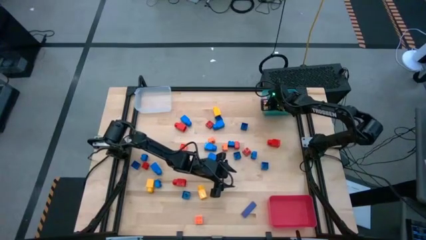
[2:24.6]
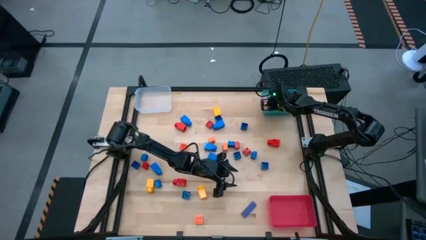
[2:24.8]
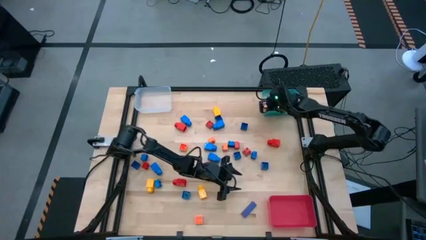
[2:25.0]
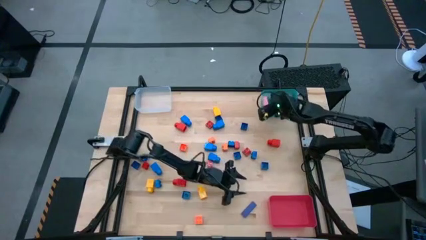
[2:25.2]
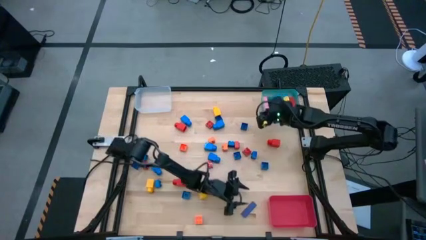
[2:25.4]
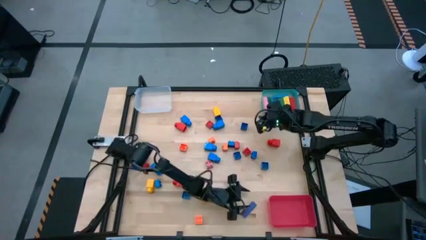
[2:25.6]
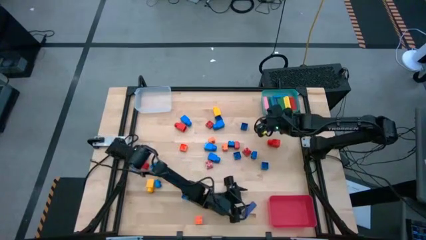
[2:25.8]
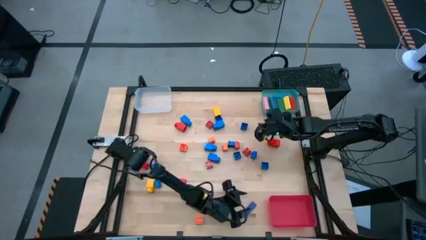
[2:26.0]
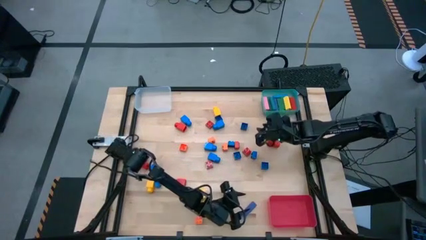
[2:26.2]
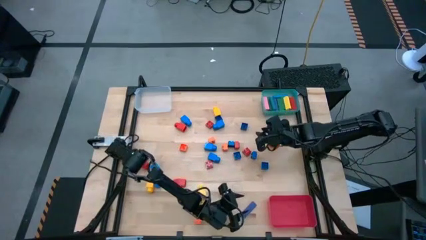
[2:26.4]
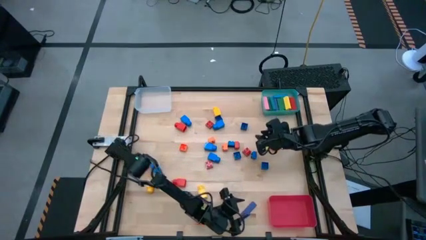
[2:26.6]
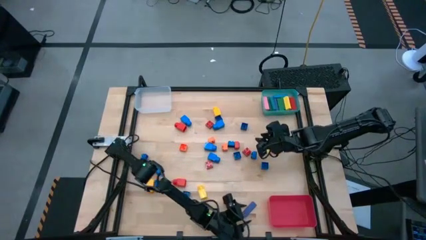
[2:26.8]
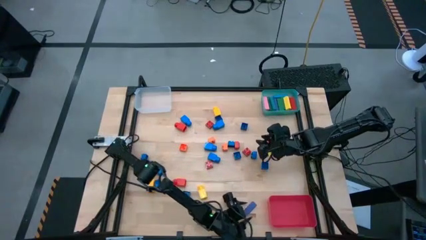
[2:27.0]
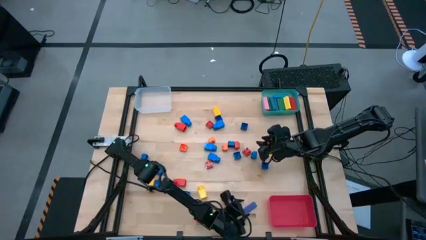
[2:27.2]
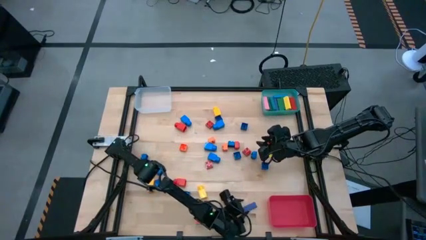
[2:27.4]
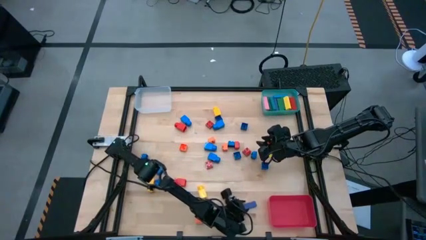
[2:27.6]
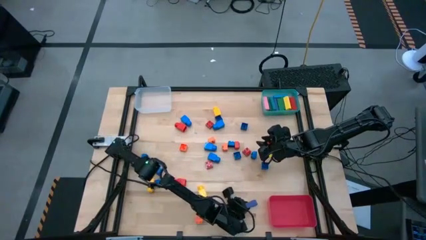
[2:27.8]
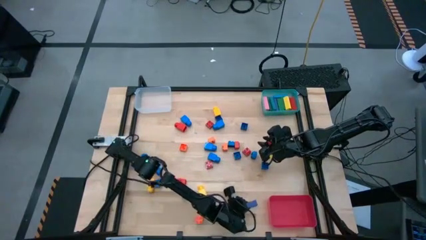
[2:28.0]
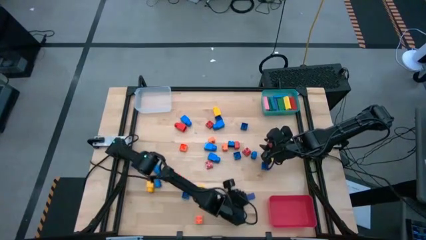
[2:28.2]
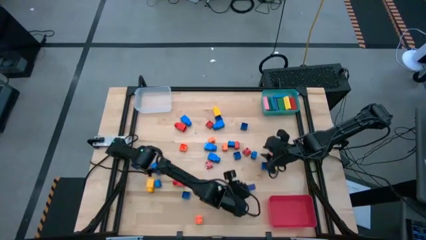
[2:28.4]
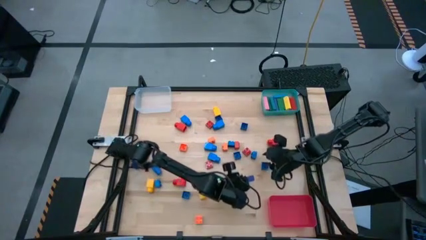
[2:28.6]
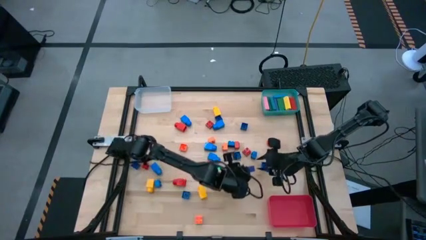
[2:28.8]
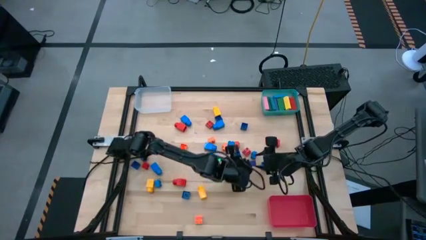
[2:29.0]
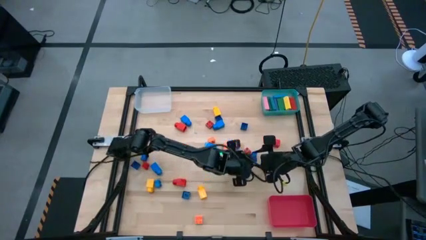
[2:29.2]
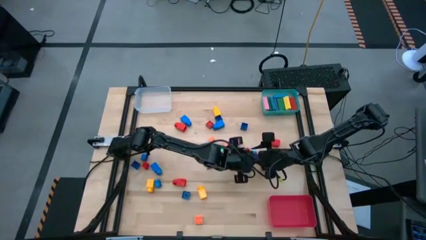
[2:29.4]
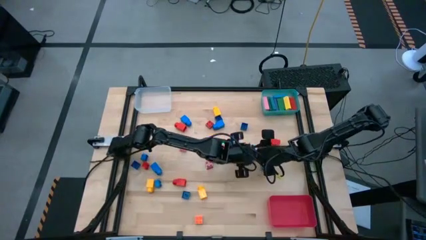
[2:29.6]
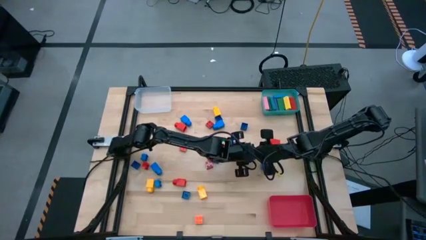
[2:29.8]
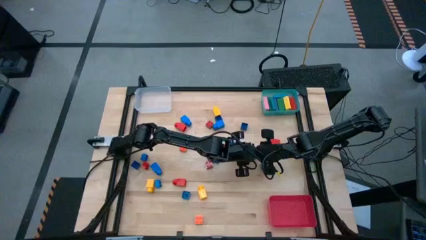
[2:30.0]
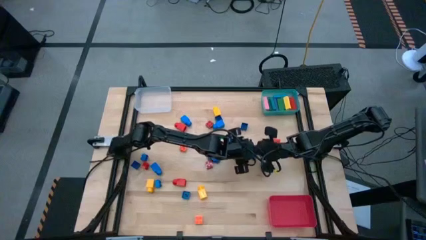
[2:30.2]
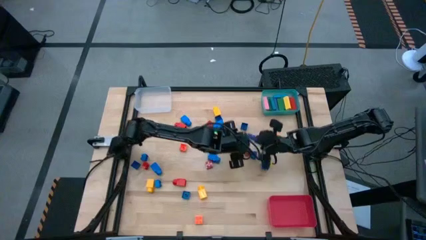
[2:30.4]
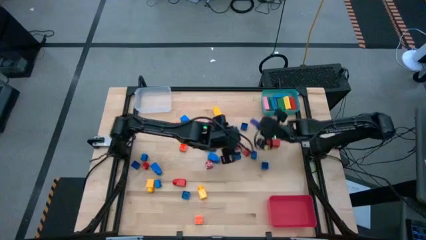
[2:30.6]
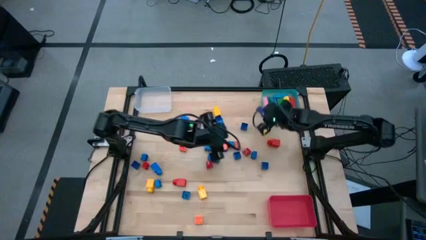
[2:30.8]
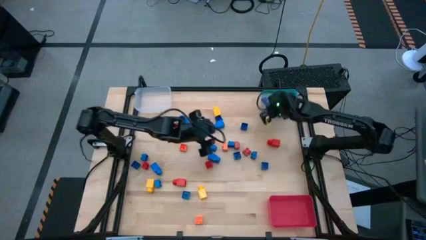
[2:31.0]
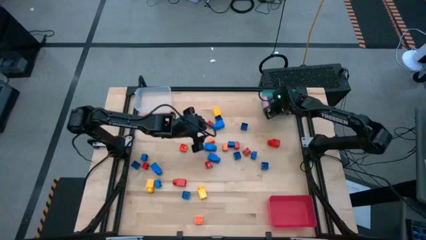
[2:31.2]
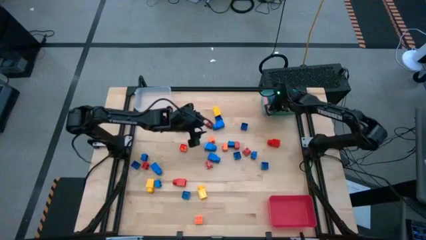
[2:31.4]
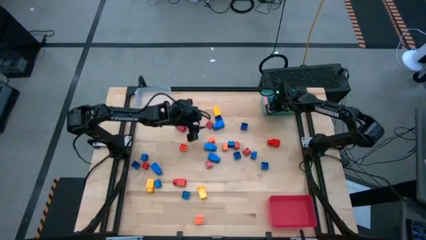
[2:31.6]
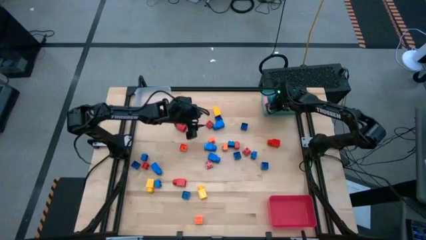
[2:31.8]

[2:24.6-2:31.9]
Task: Sort blocks by size
Put the blue block into the blue bin

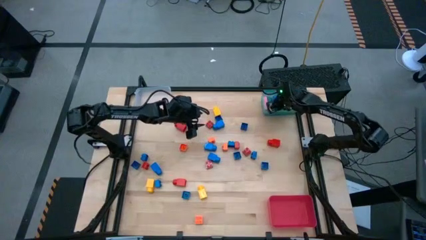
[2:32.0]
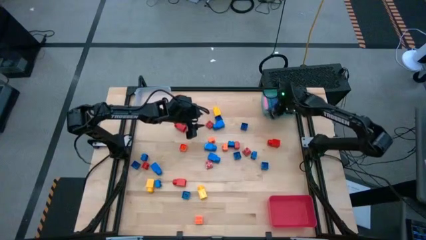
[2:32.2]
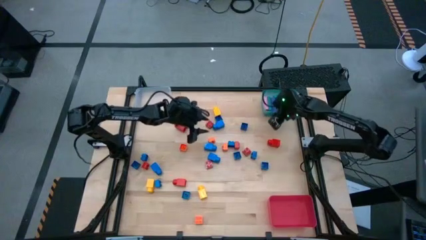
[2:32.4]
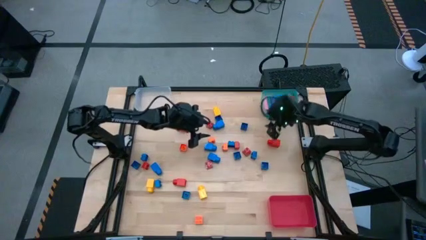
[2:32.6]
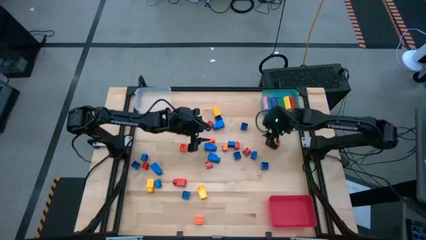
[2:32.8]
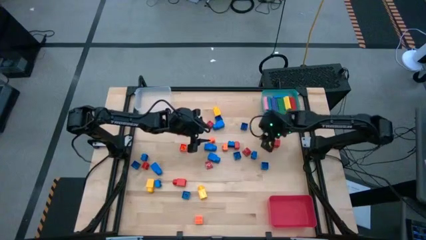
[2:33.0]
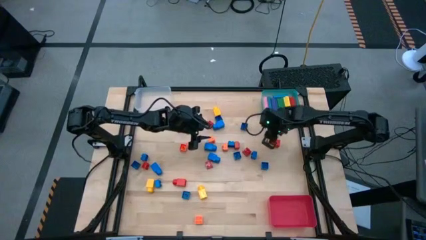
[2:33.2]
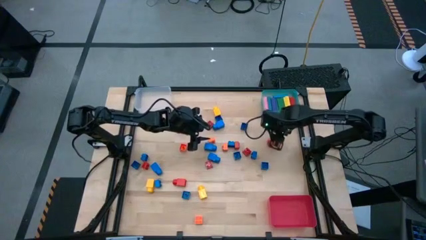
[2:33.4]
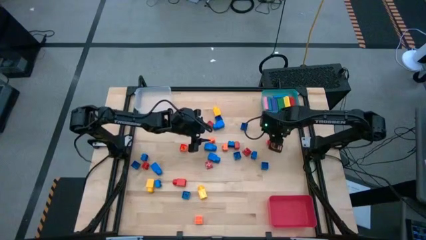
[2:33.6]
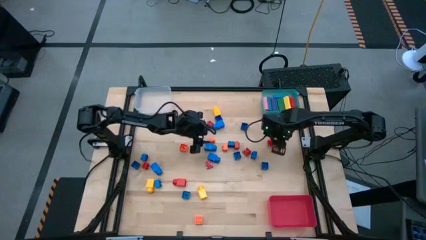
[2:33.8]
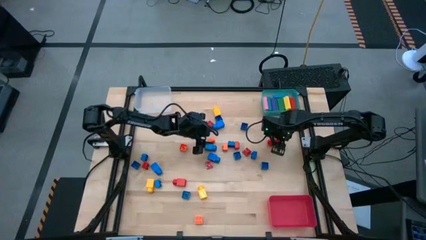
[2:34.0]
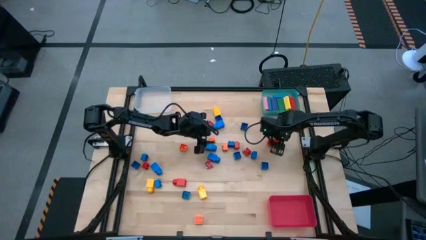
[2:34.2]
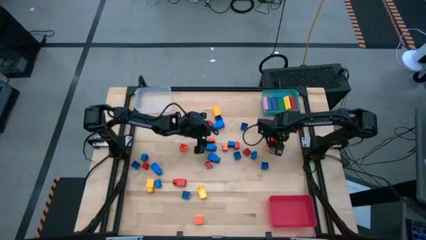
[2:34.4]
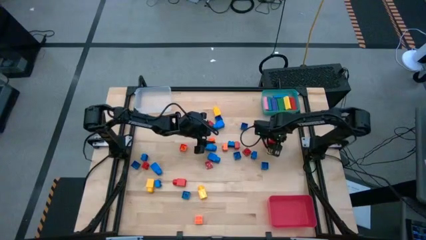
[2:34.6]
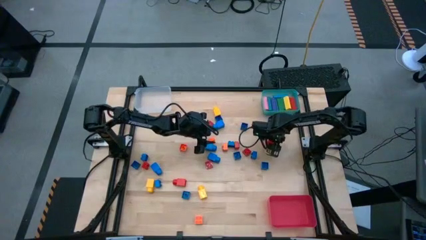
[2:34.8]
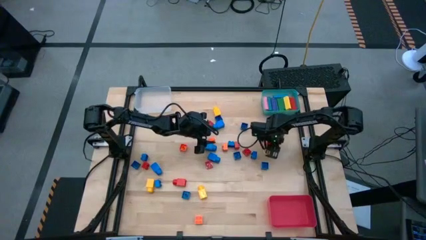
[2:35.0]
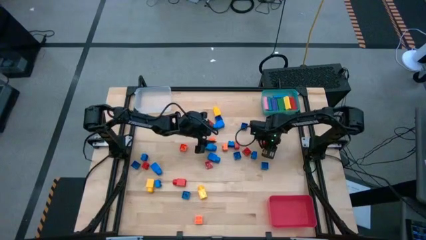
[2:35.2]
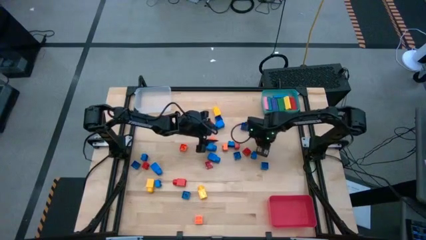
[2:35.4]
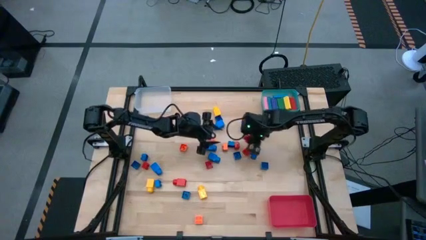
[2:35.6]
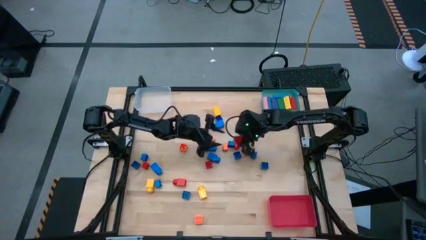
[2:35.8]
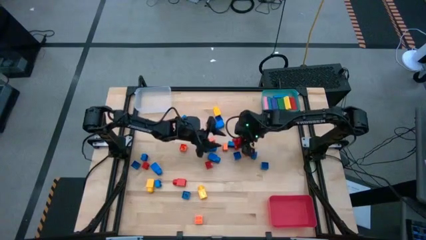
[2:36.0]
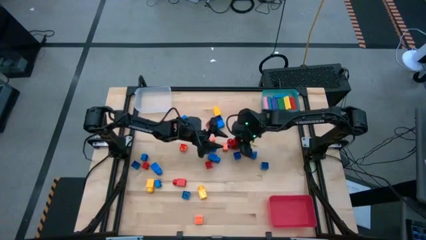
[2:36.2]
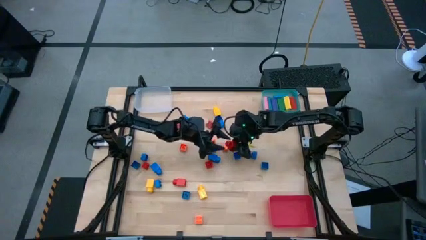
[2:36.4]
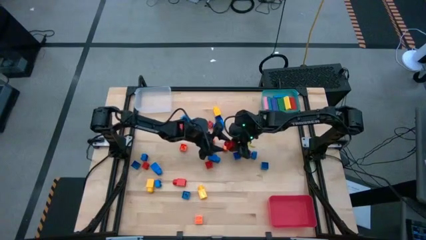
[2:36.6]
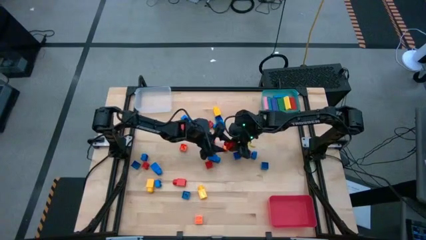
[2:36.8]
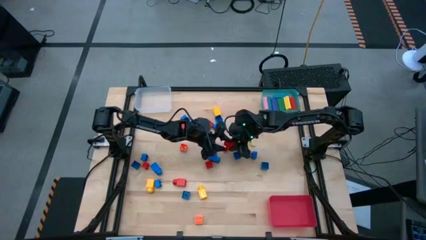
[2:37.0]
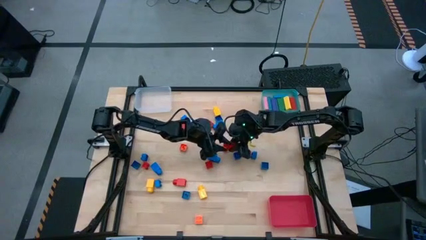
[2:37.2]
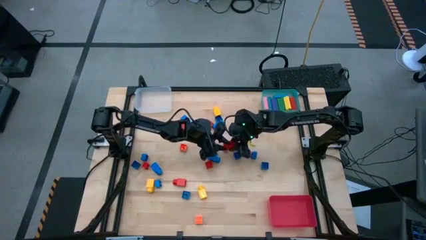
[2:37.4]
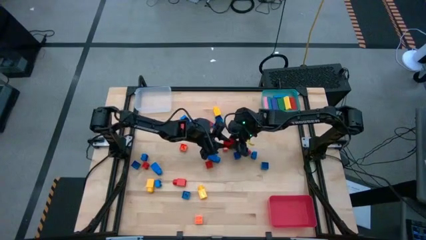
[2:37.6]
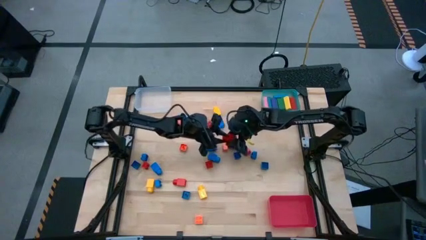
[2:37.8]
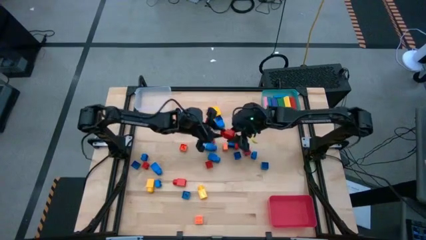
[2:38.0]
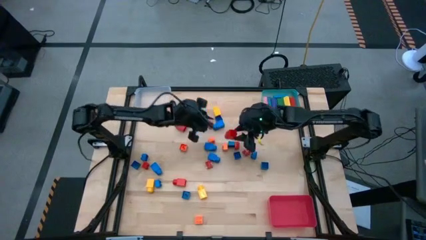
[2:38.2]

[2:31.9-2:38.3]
Put the big red game piece into the transparent bin

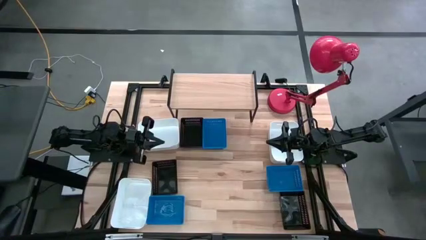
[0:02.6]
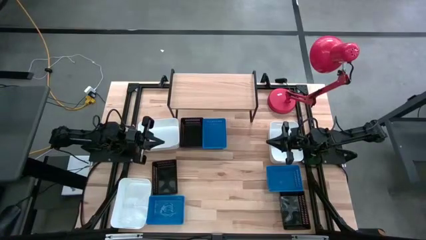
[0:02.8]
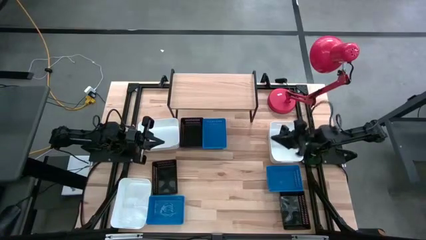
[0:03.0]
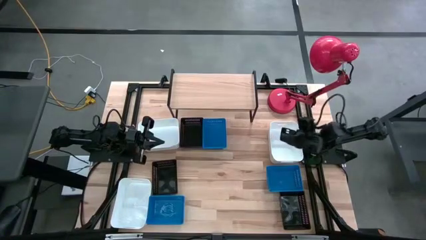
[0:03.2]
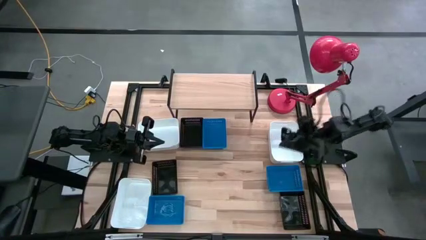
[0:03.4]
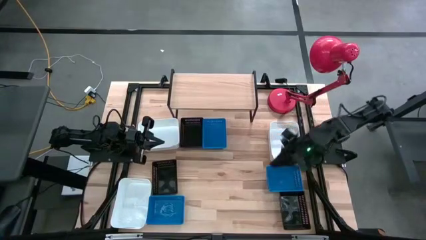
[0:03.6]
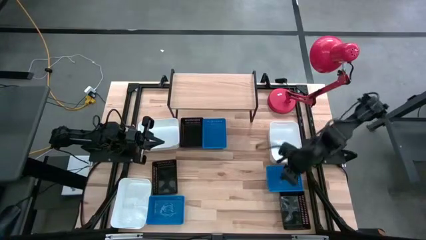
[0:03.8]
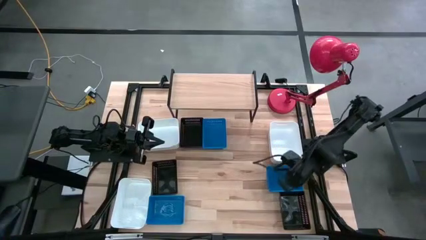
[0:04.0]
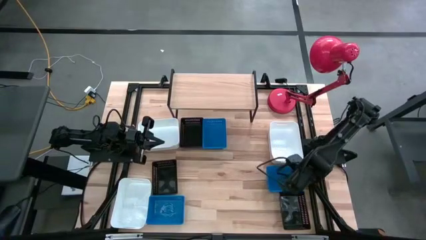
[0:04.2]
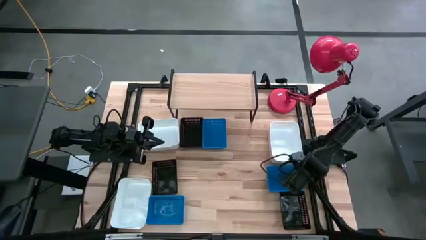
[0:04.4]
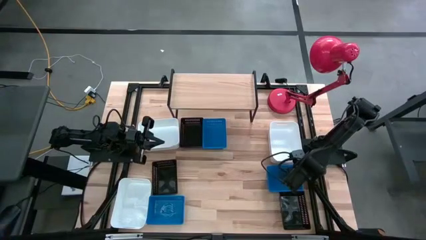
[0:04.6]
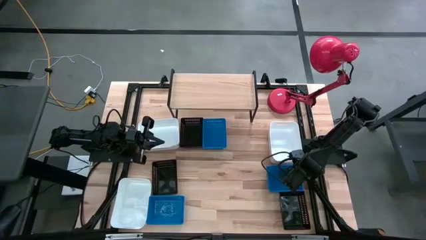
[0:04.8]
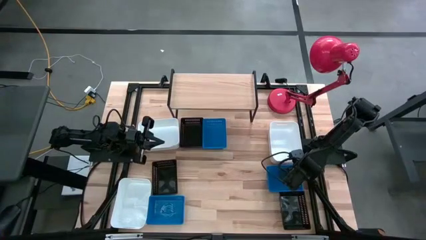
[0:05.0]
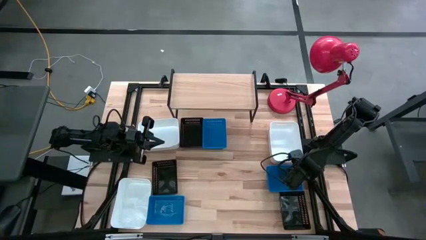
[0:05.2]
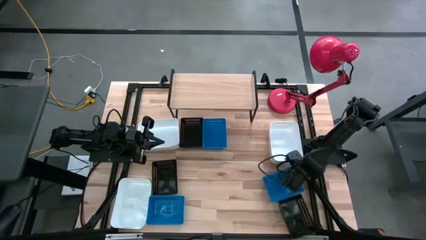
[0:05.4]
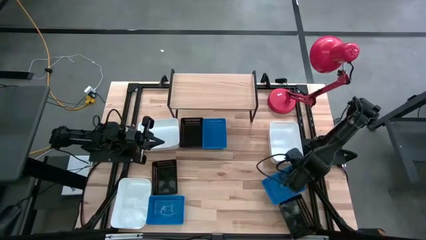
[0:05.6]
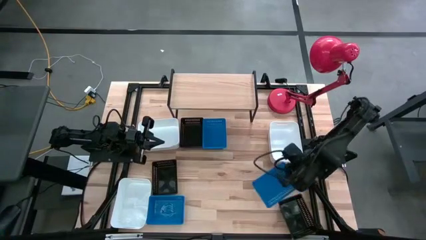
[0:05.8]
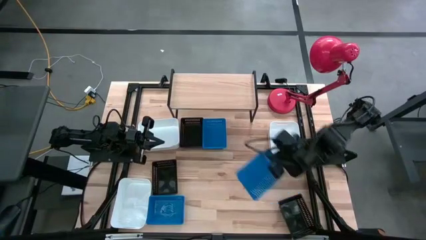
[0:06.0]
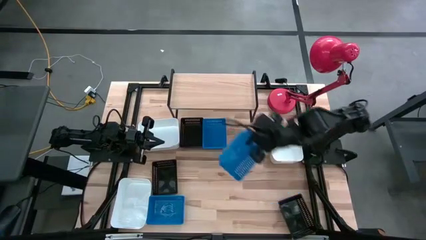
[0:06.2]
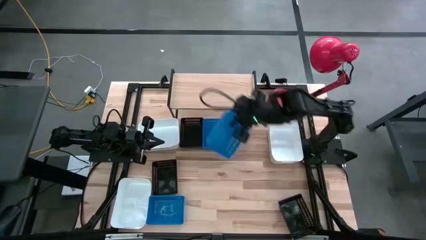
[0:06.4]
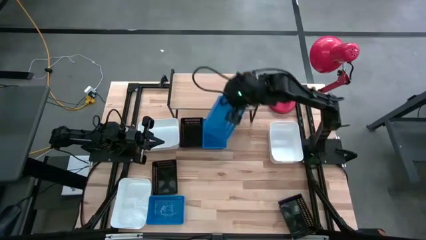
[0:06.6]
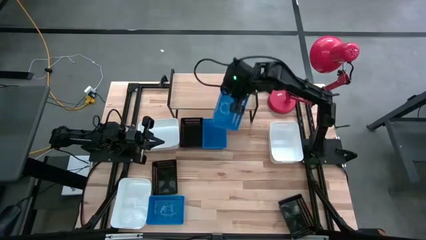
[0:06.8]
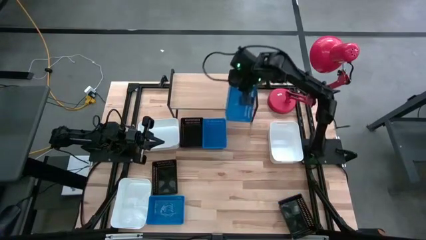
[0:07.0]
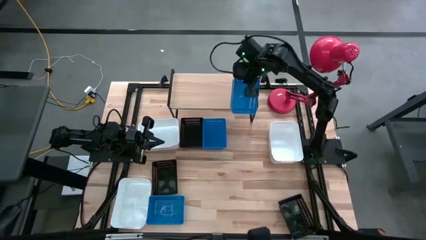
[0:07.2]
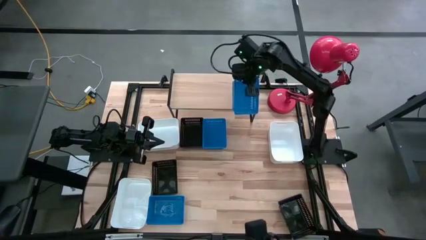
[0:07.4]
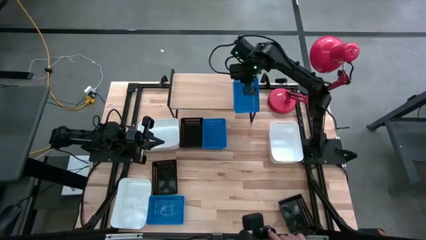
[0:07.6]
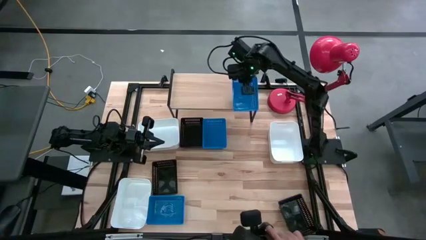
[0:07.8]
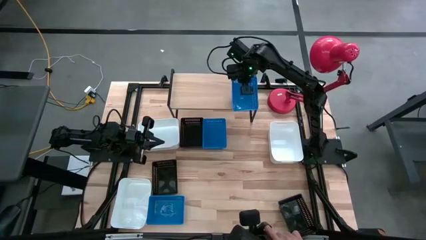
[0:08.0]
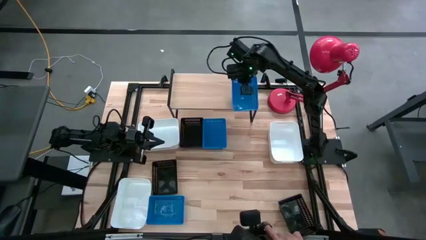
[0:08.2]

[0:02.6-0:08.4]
Task: Stack baskets on shelf by color
Put the middle right blue bin on the shelf
